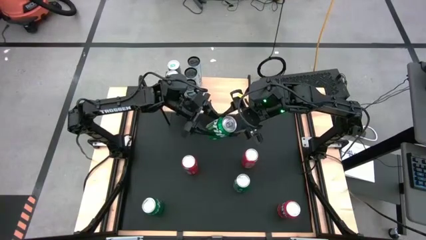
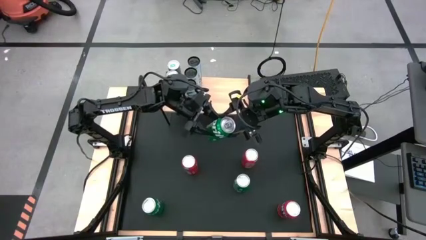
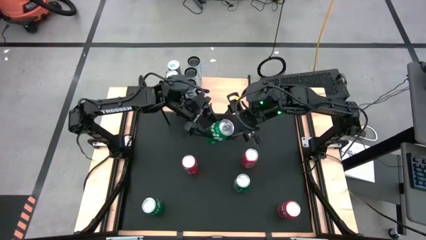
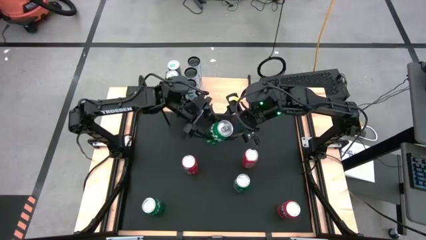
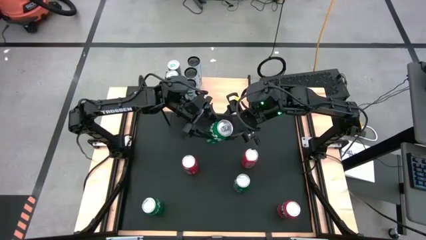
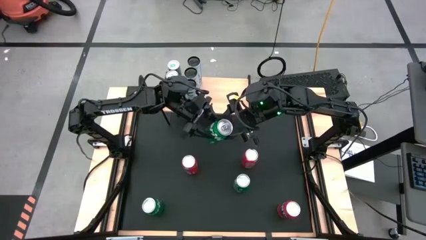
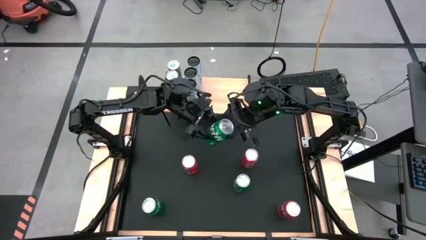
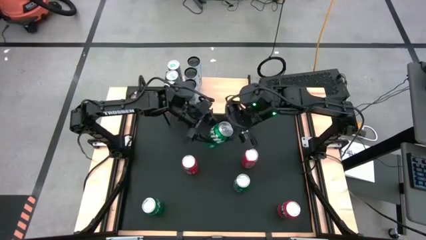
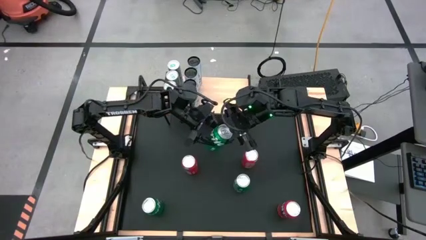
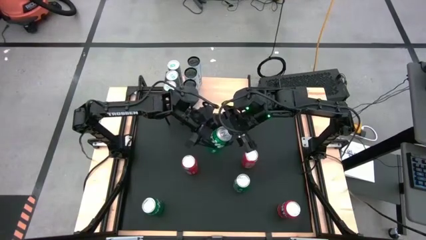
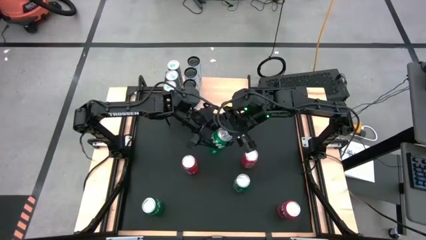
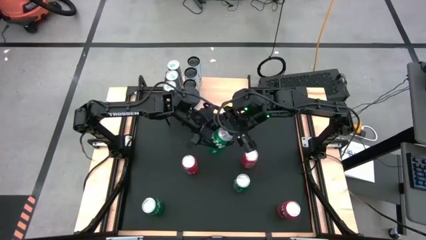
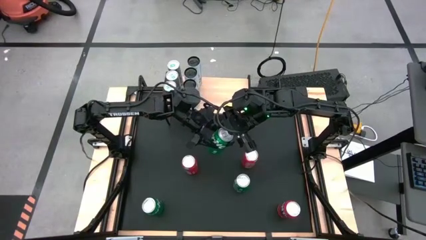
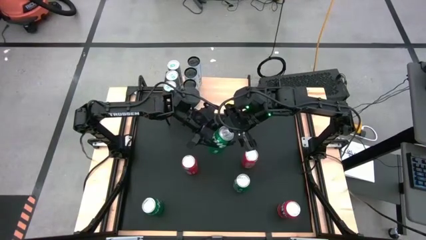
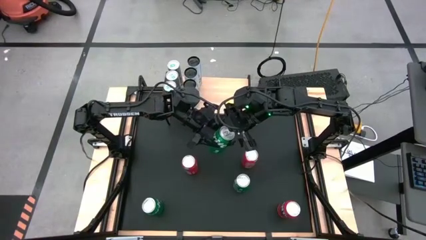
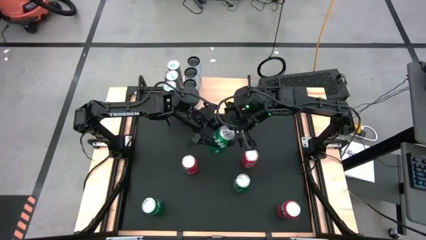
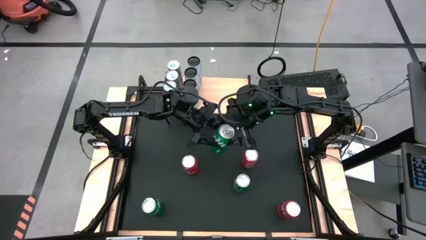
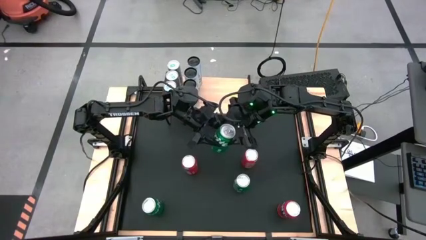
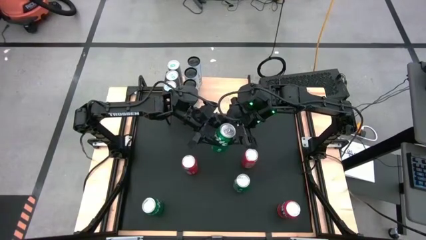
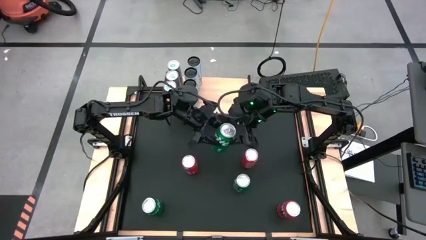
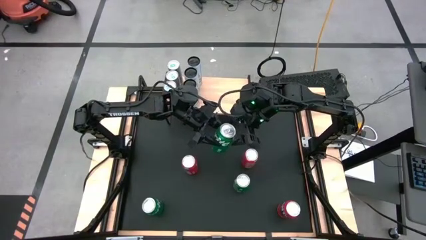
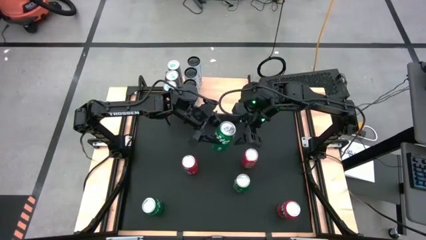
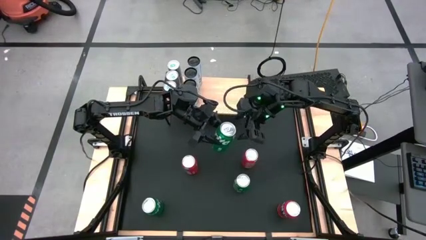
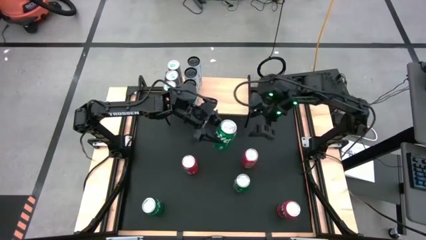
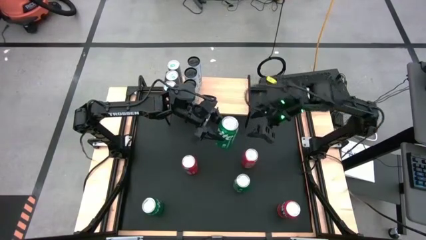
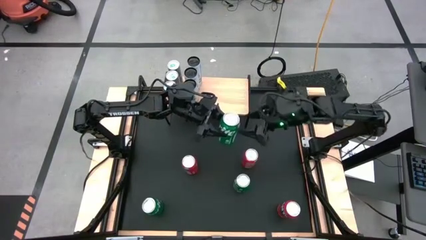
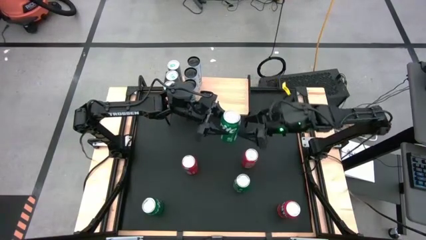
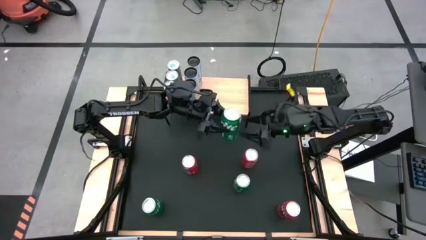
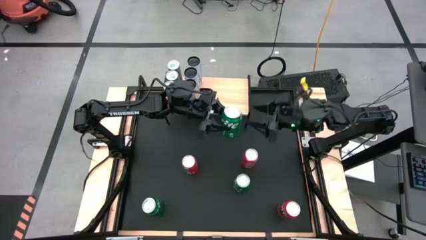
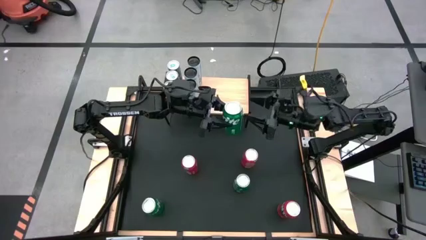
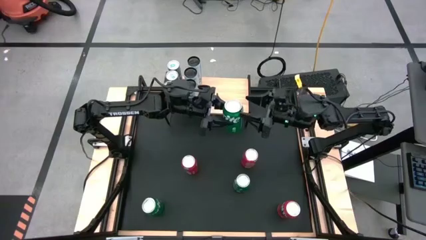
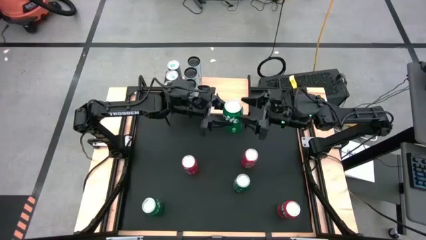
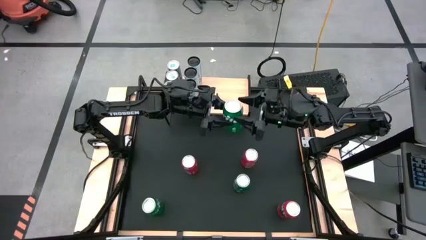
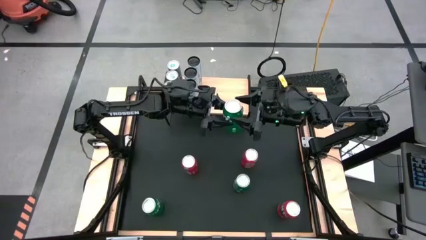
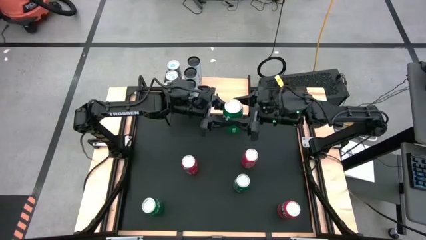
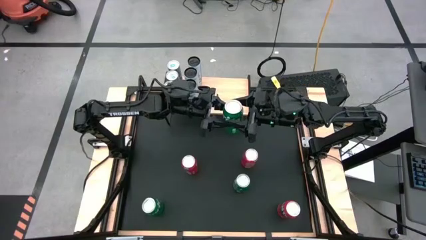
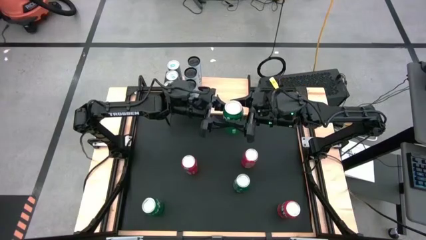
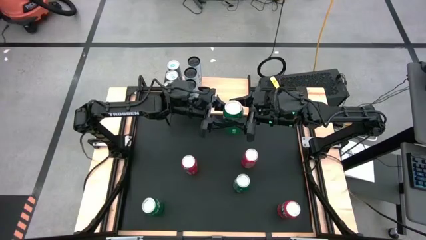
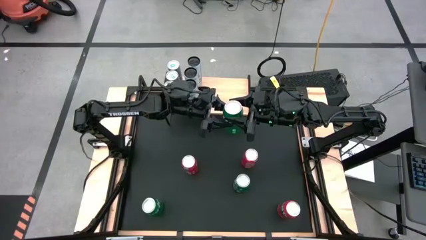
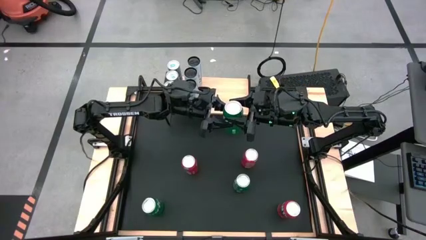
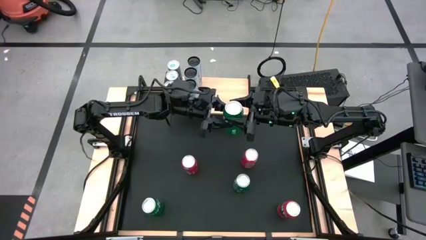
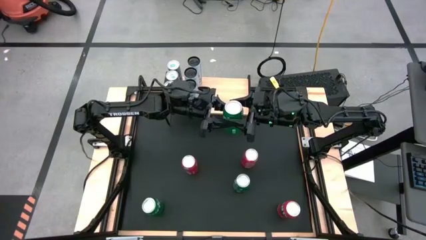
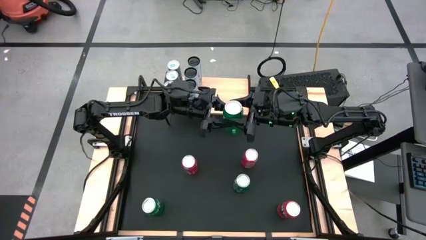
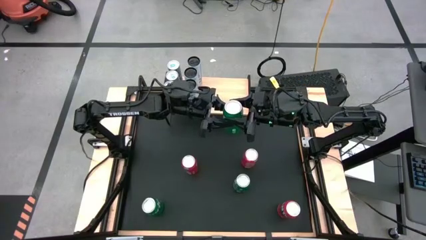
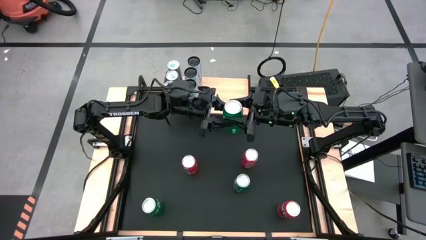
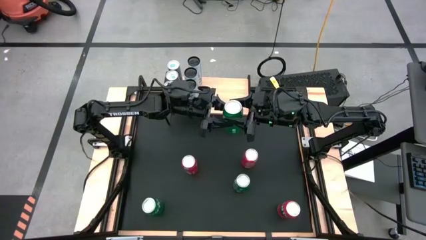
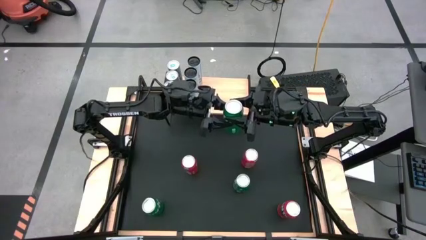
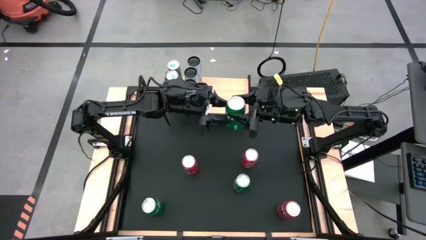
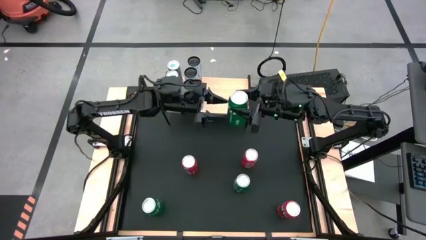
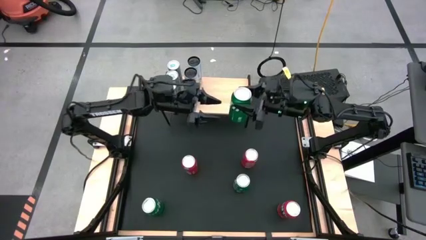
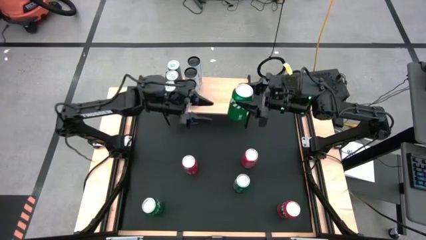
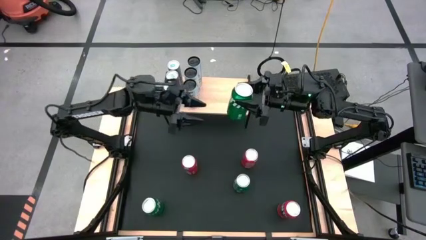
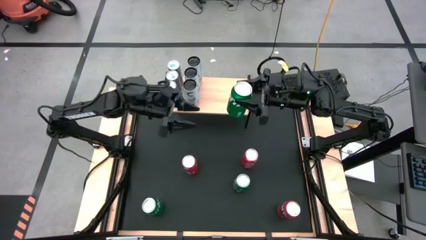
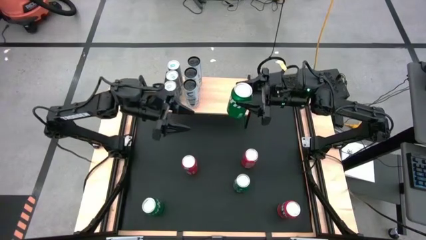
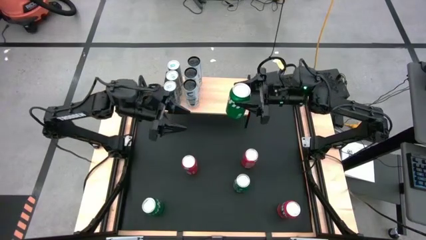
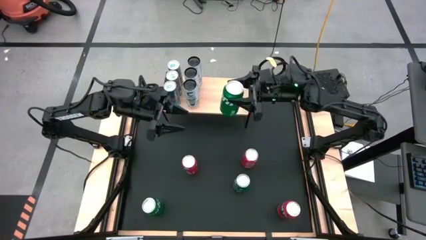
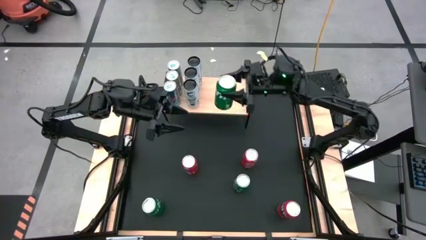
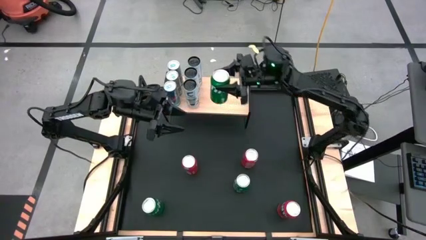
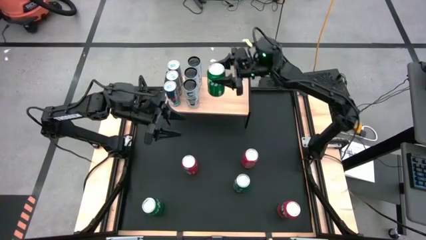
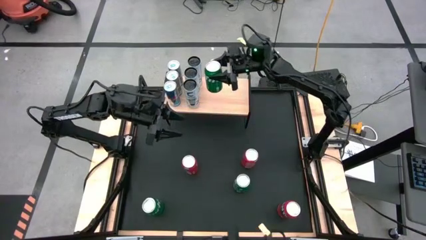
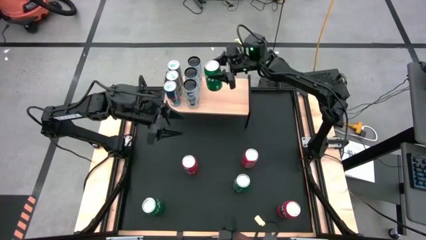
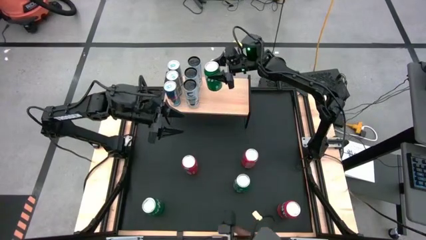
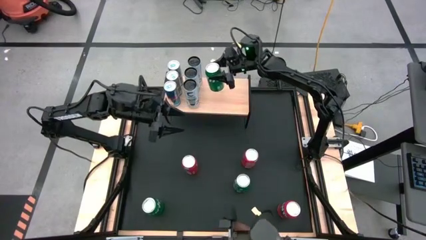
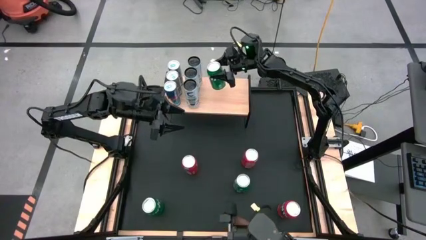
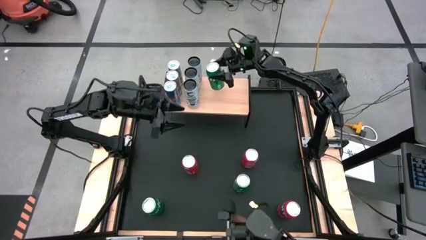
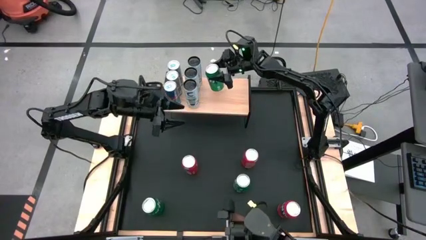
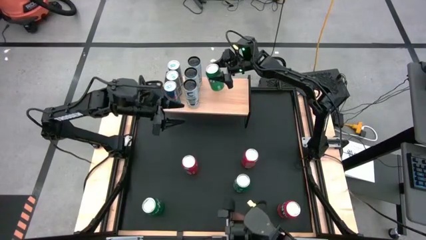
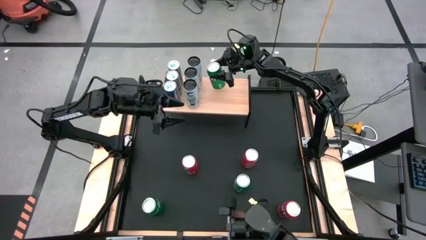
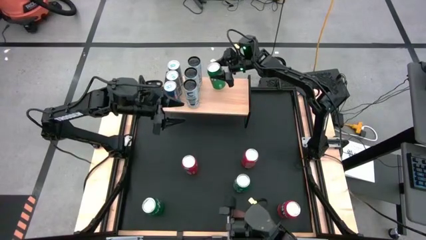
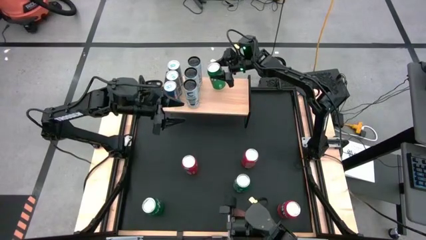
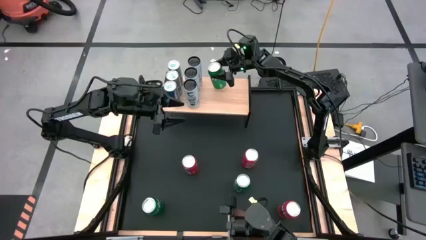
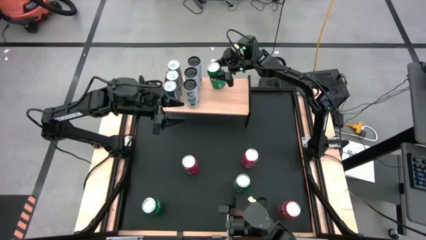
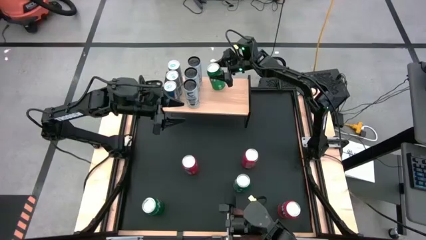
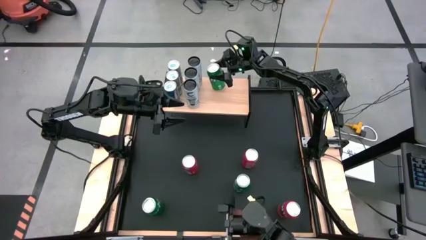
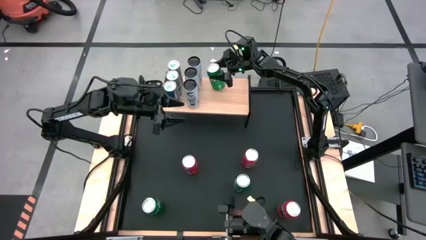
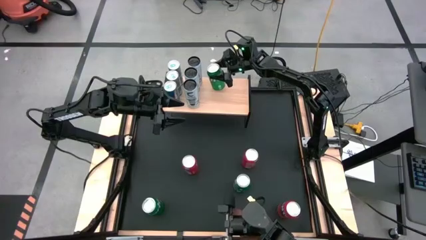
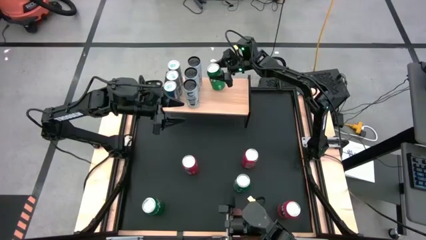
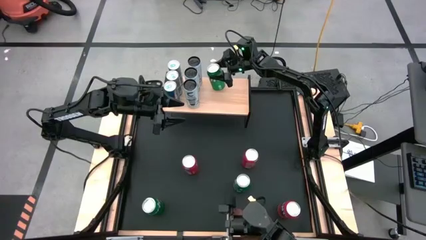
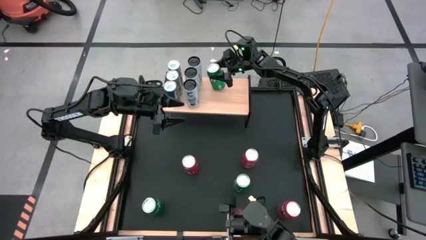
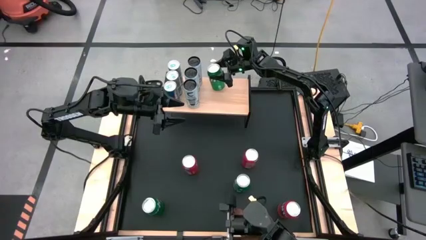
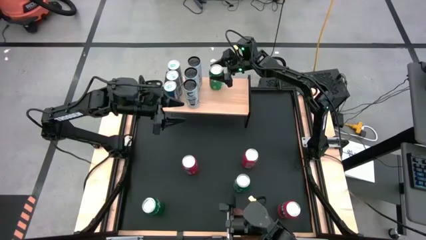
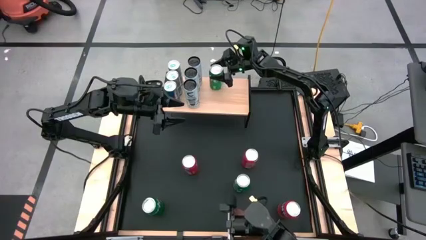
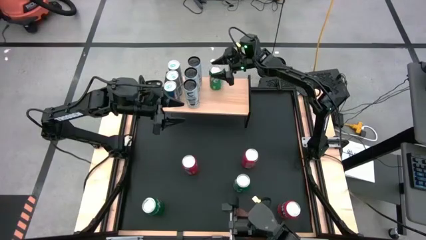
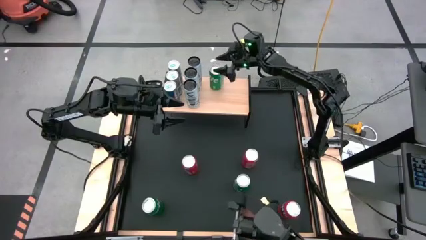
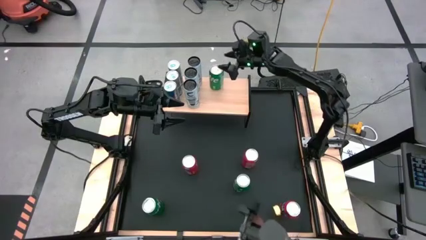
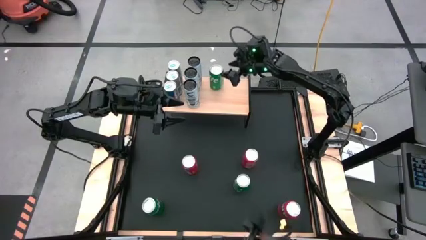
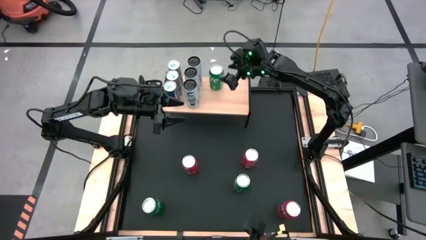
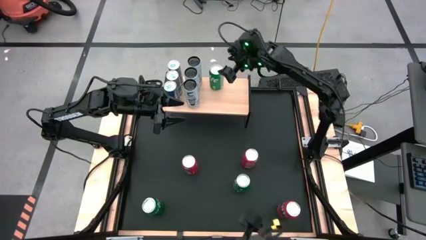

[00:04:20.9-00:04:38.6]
Task: Place canned beverage on shelf
Put the top green soda can on the shelf
